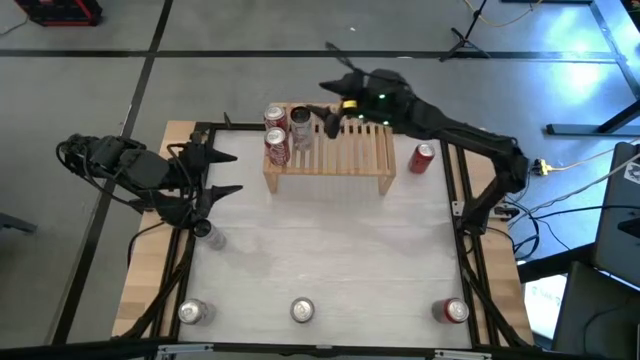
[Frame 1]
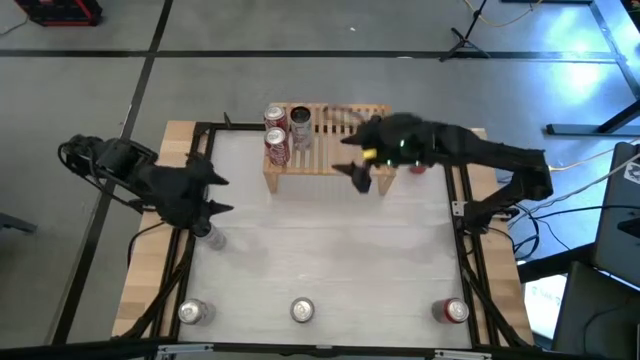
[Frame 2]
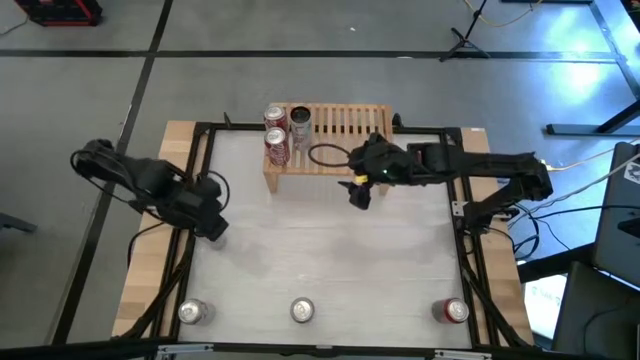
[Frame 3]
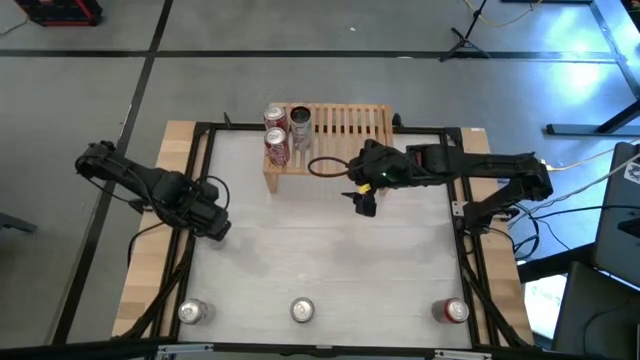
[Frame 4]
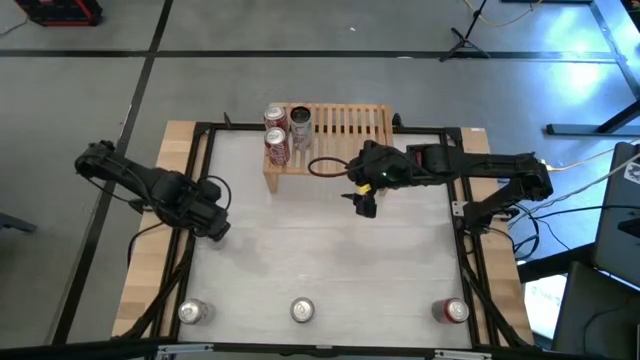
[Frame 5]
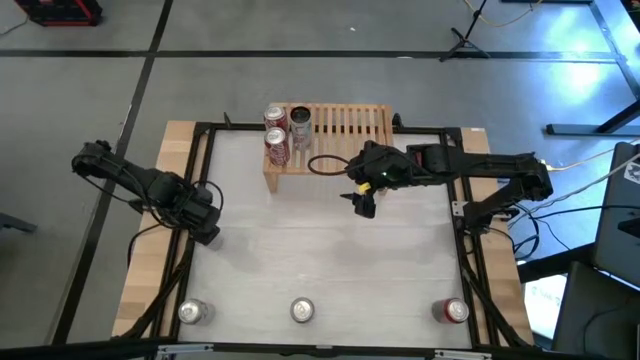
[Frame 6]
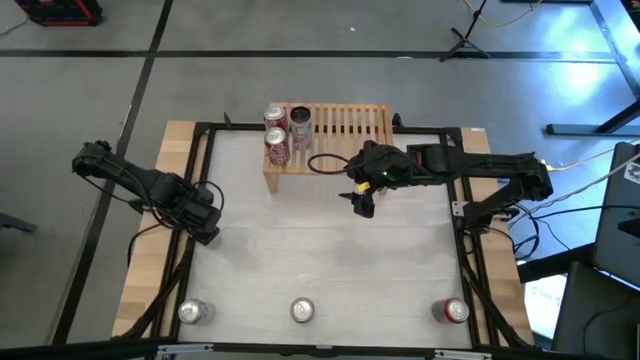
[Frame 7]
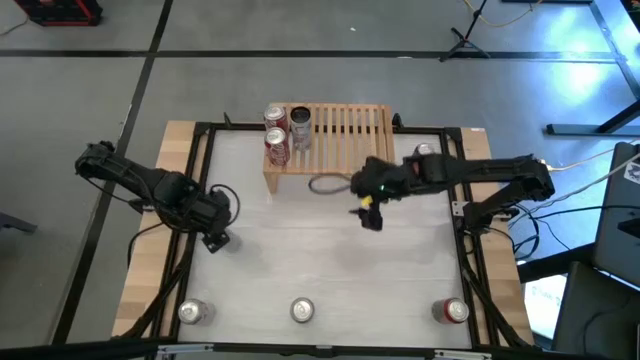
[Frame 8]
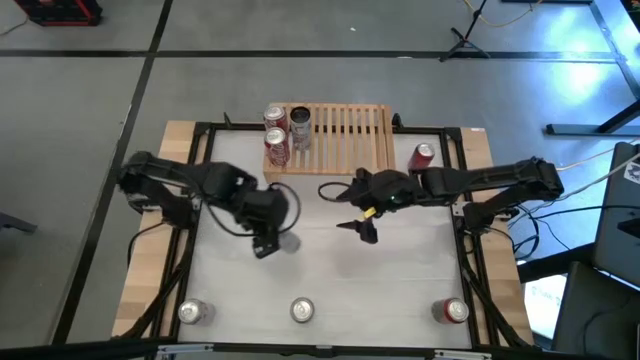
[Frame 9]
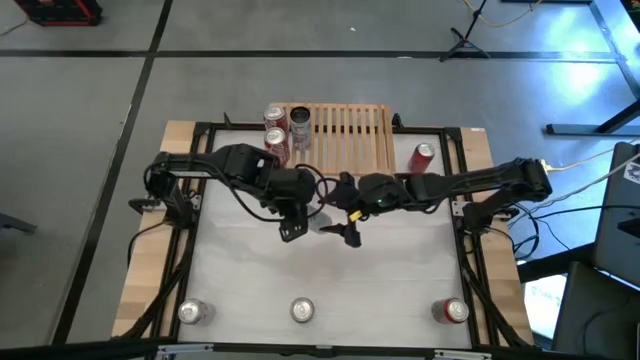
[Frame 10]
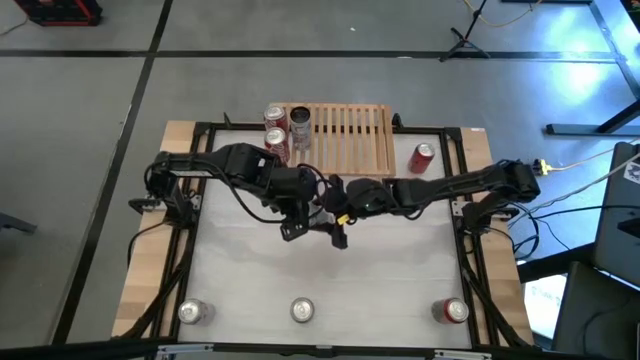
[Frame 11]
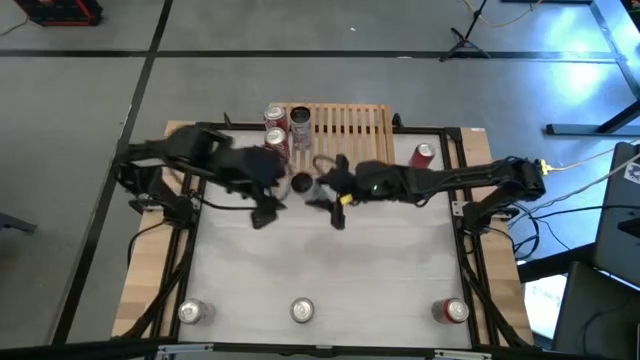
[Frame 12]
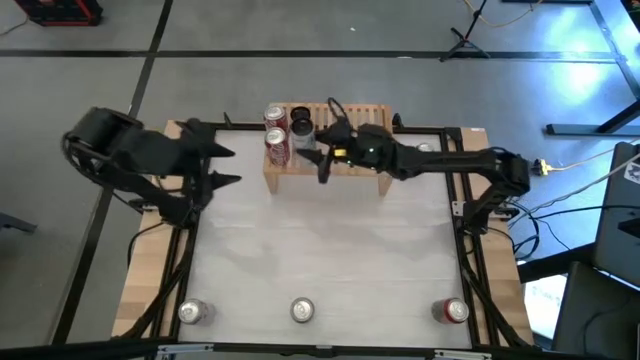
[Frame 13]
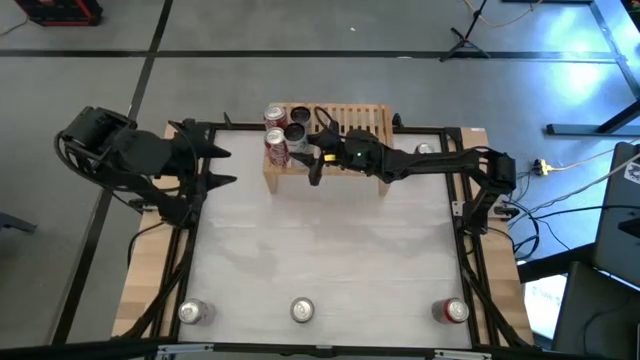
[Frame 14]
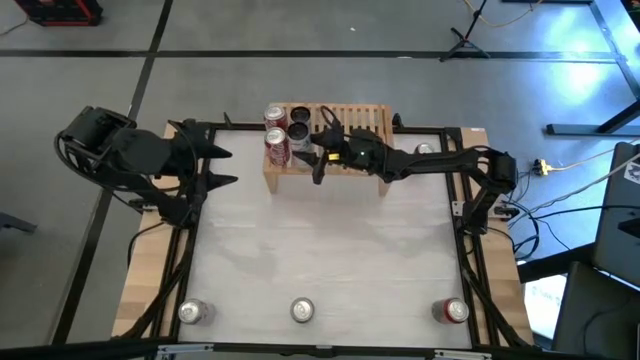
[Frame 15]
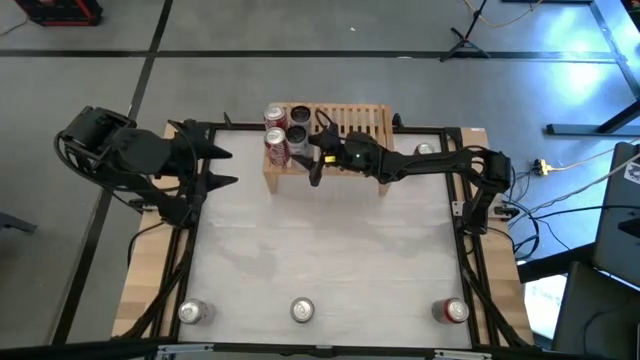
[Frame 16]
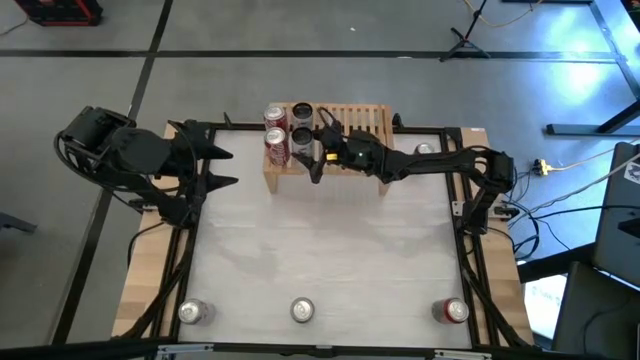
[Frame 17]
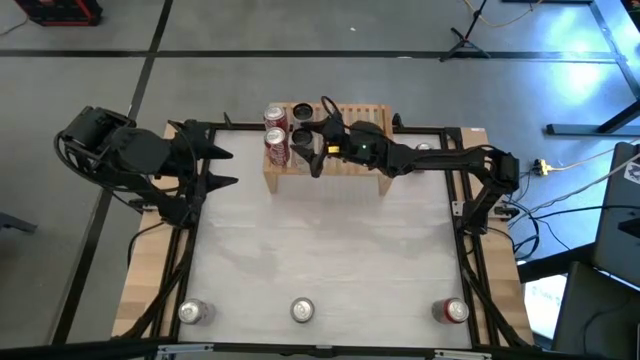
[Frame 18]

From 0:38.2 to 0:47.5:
Task: Place canned beverage on shelf
Put the black soda can on the shelf aligned with the black soda can

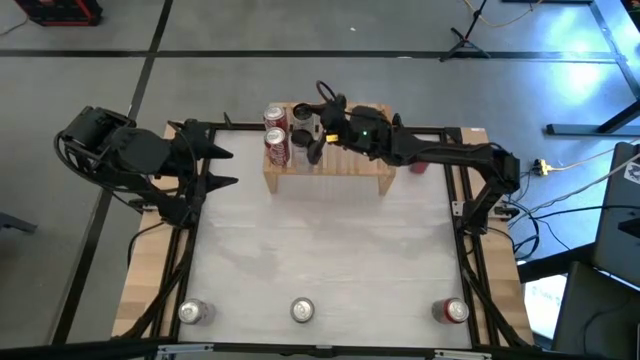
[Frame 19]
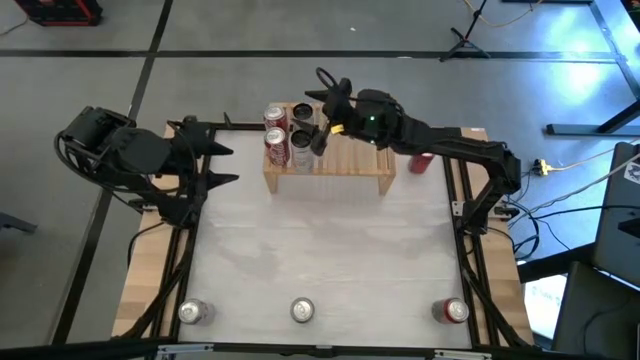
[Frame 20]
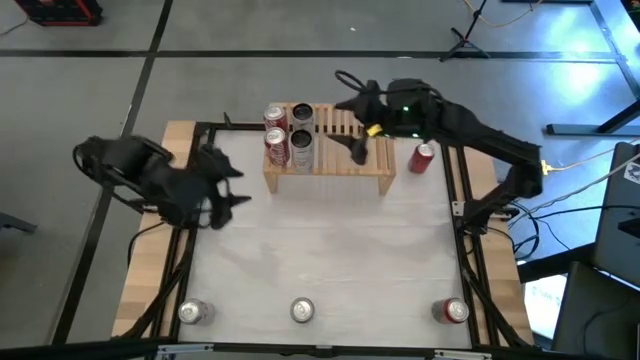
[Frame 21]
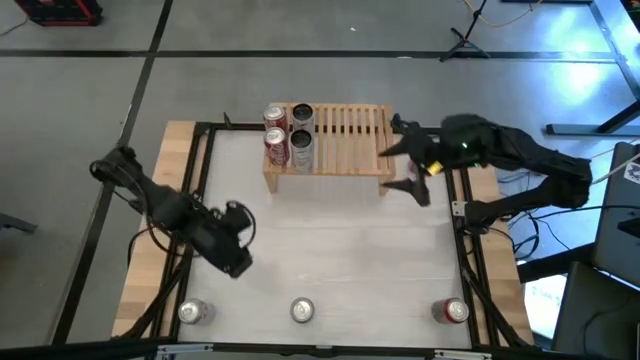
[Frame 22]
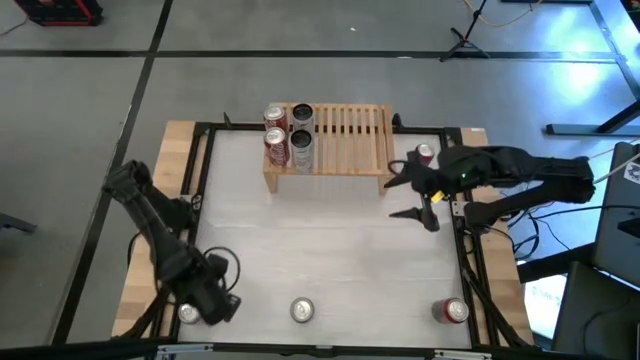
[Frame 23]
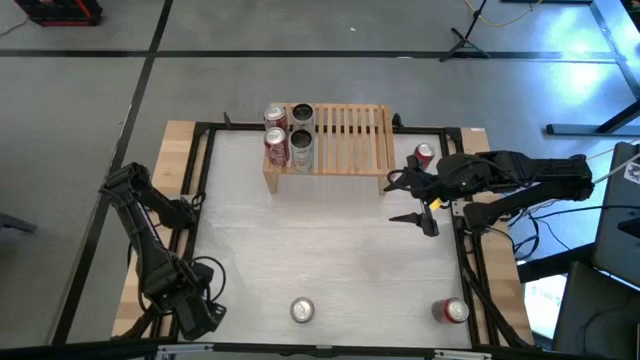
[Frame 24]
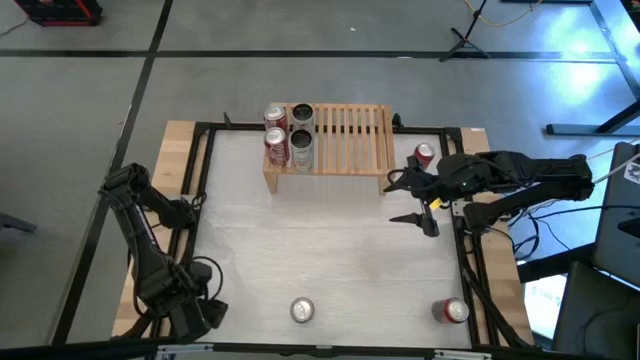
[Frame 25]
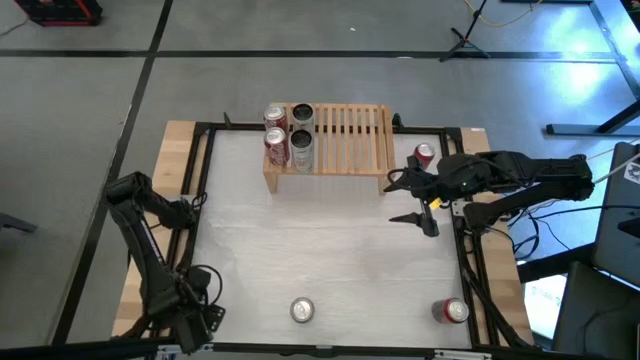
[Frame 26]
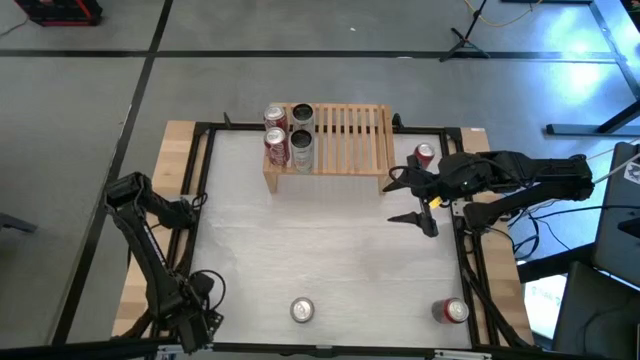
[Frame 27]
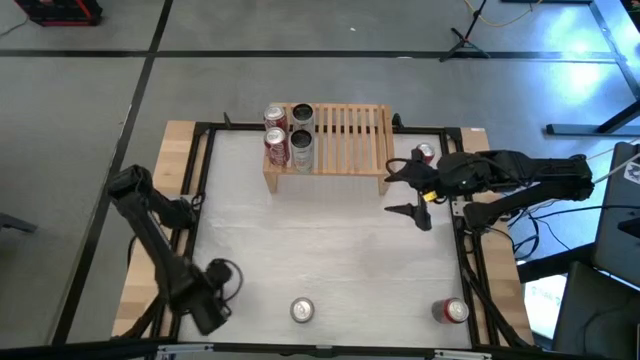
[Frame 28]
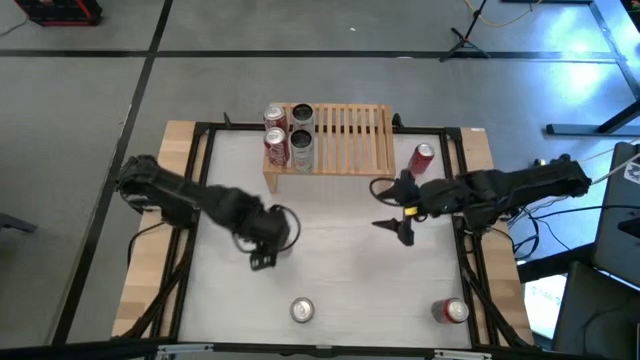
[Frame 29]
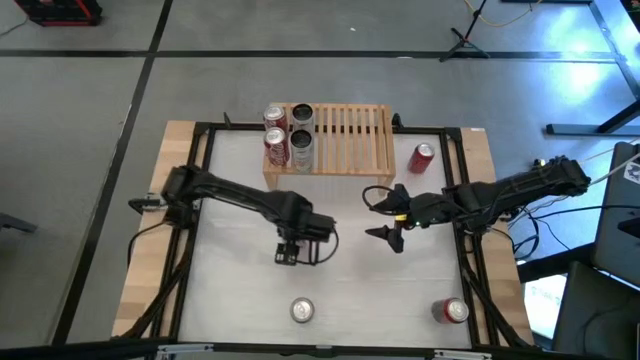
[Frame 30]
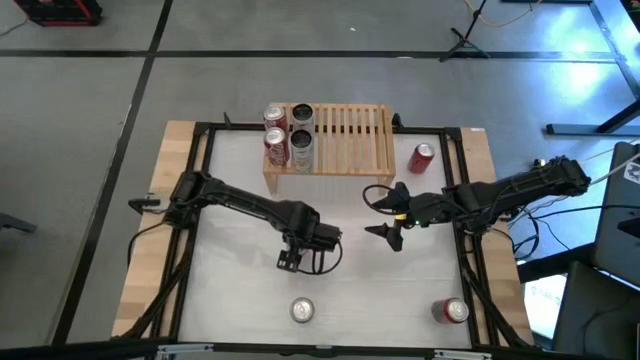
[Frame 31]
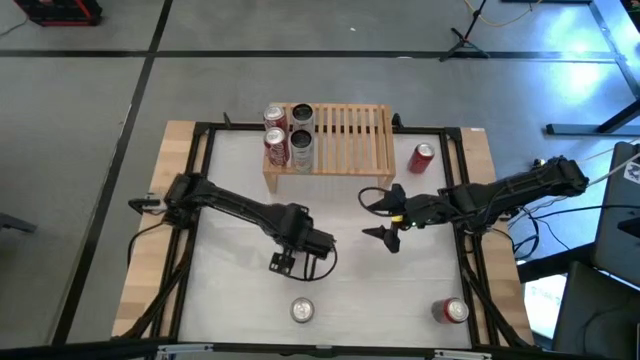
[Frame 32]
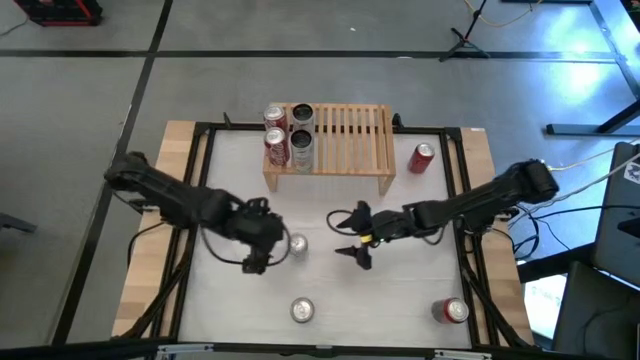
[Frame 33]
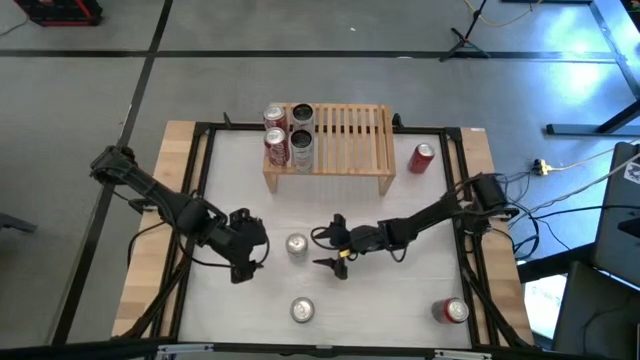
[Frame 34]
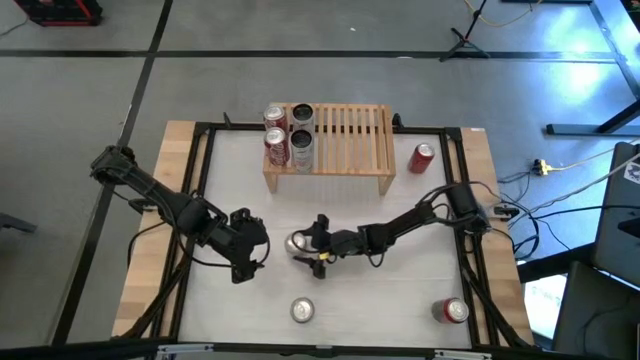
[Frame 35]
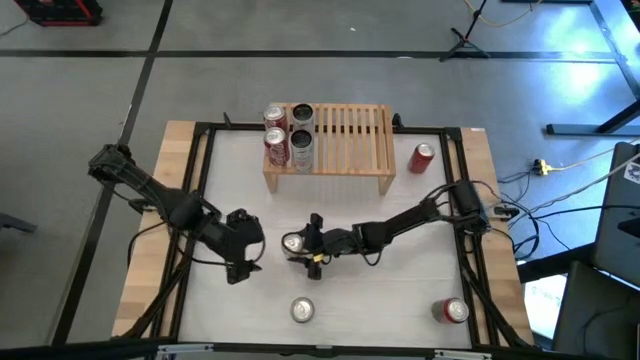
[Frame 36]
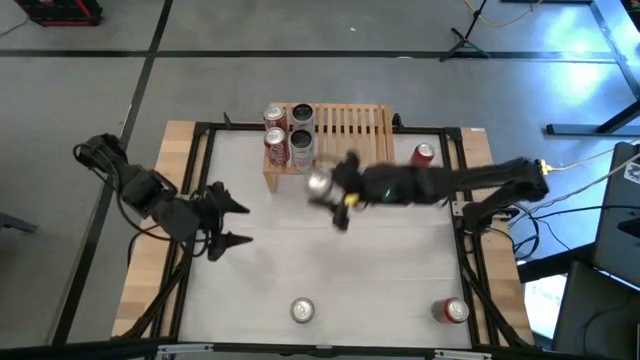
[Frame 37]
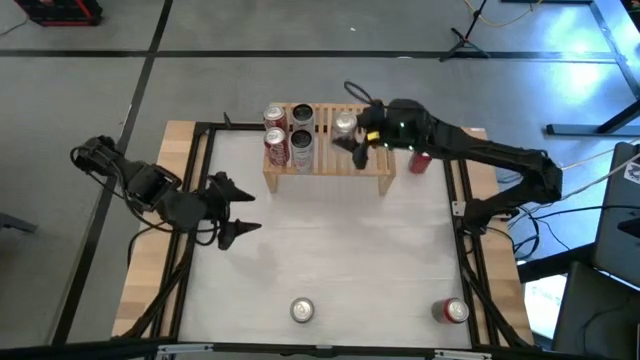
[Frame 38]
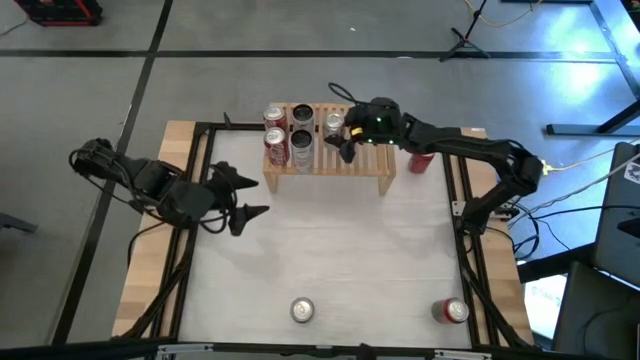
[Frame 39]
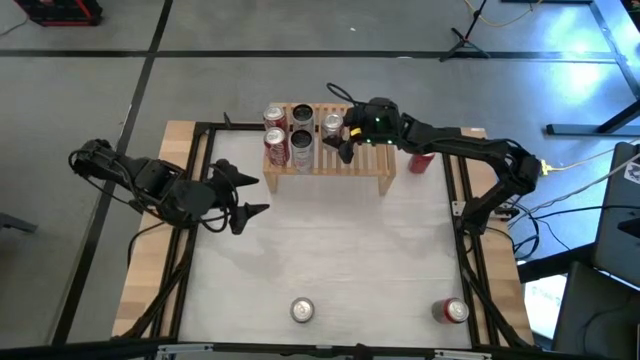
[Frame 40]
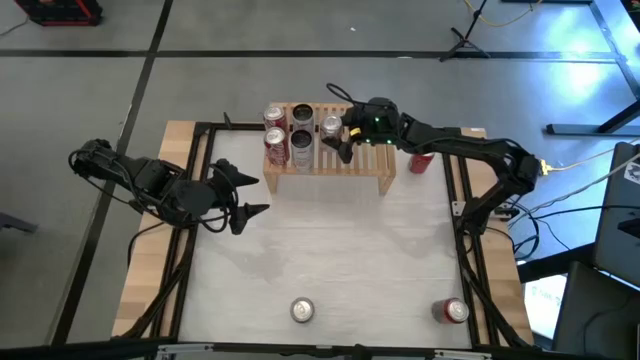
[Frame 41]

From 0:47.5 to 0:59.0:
Put the left white soda can on the shelf

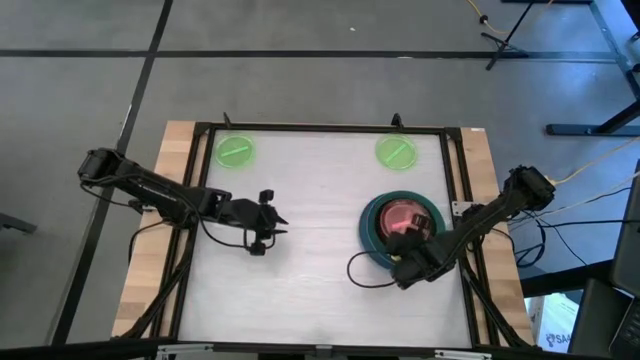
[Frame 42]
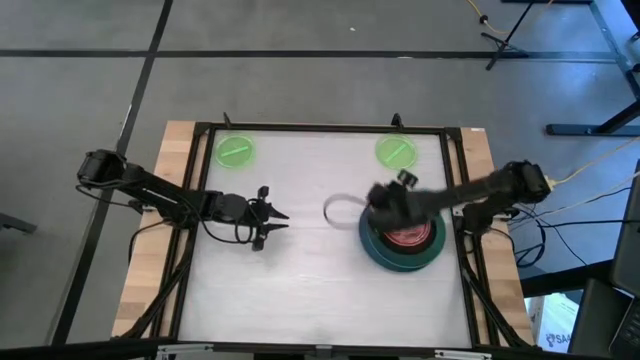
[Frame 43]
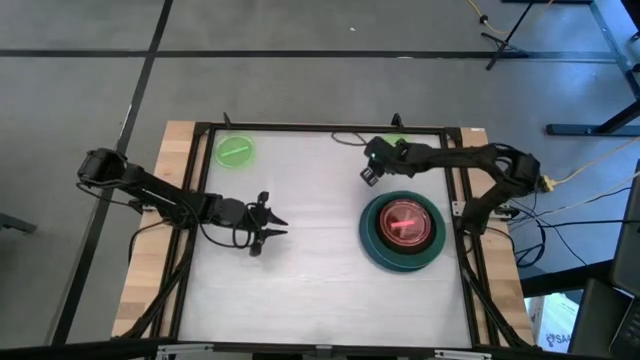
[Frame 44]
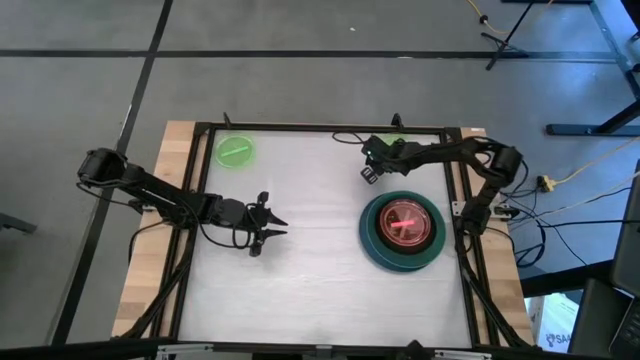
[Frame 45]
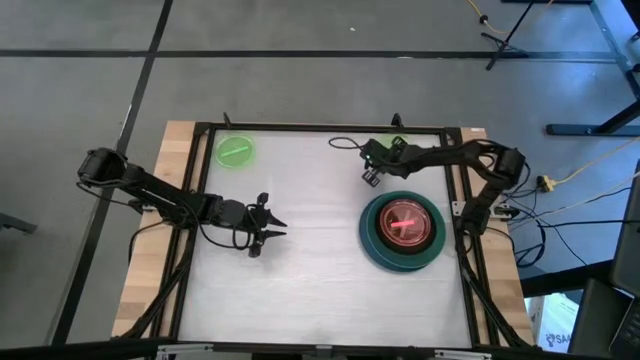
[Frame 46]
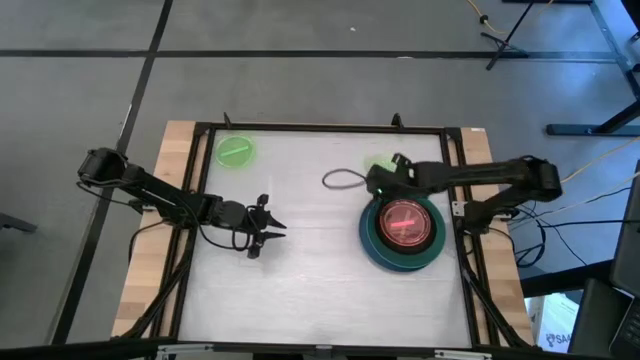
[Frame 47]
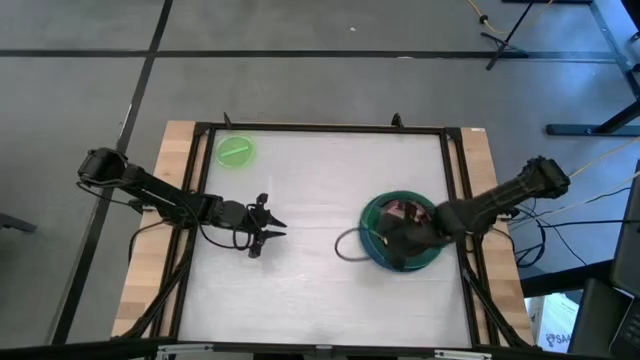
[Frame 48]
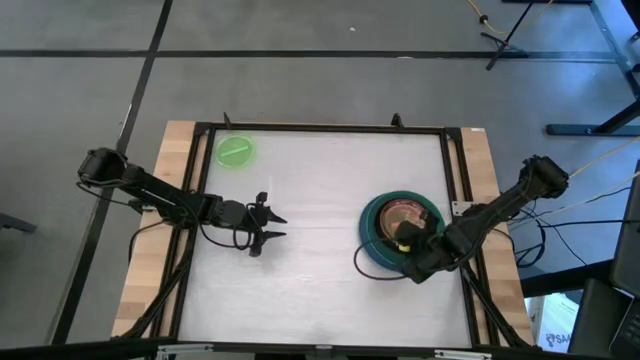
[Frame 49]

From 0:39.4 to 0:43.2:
Task: Stack plastic plates
Stack the right transparent green plate into the transparent pink plate
